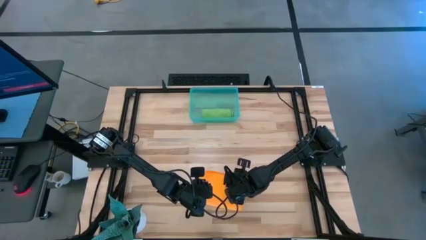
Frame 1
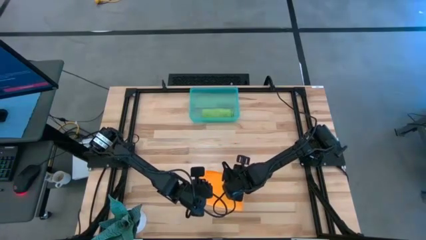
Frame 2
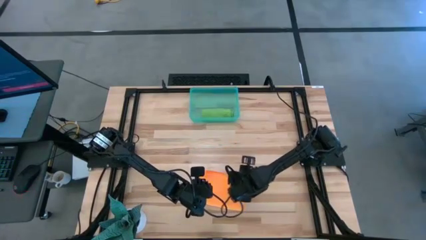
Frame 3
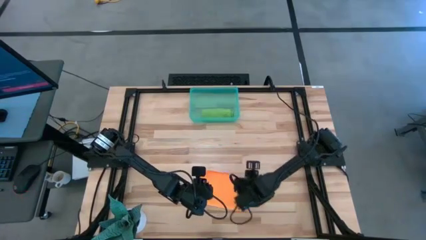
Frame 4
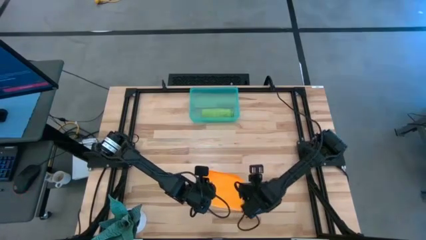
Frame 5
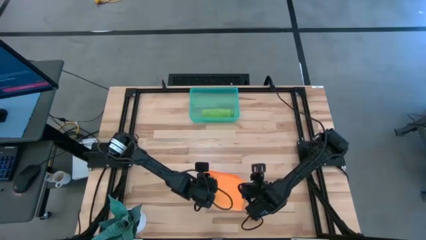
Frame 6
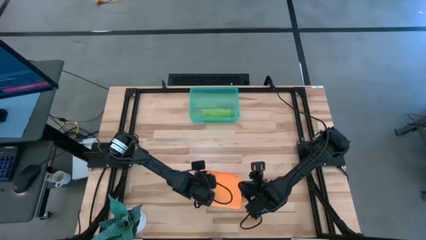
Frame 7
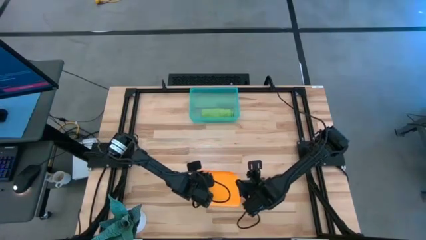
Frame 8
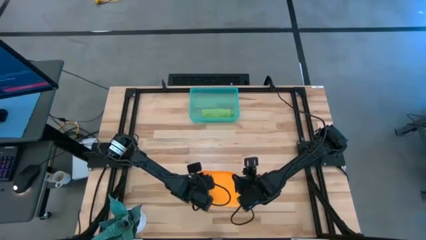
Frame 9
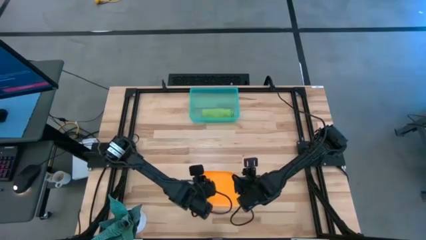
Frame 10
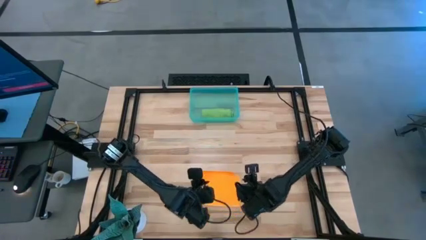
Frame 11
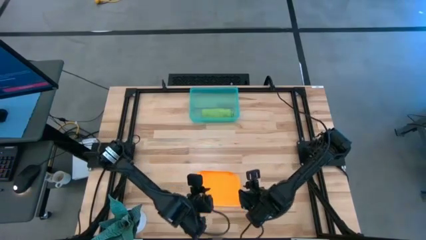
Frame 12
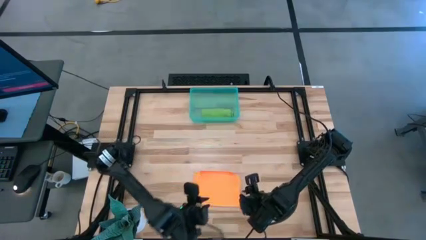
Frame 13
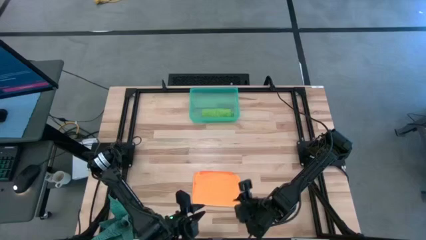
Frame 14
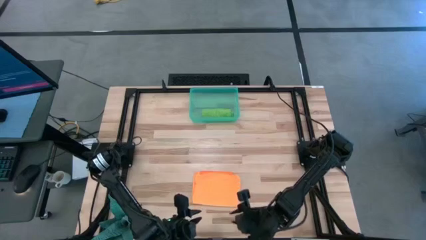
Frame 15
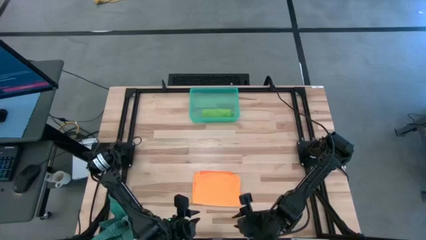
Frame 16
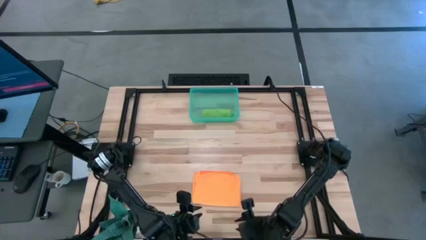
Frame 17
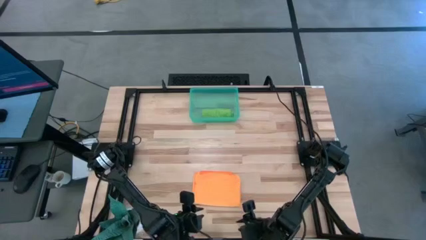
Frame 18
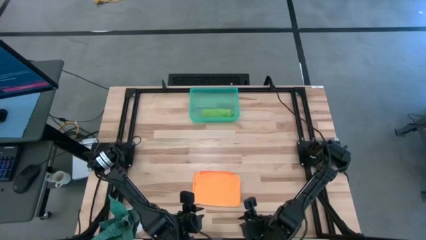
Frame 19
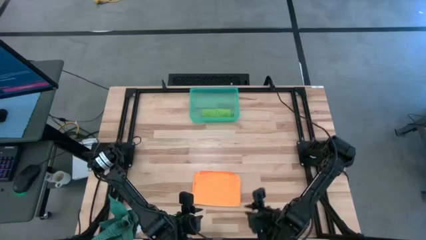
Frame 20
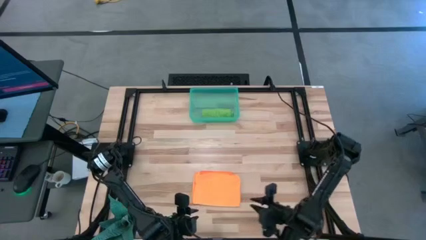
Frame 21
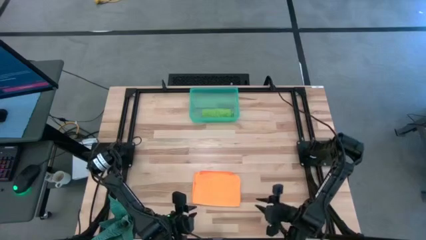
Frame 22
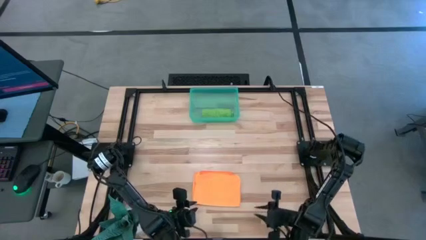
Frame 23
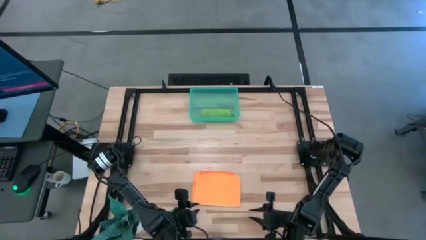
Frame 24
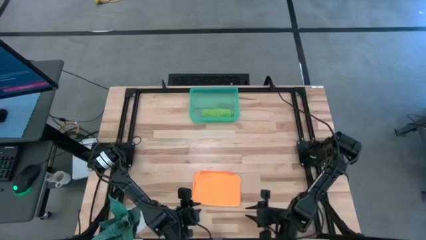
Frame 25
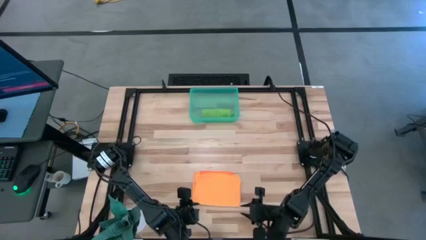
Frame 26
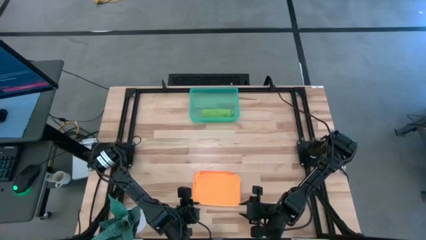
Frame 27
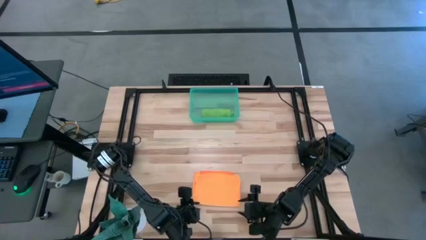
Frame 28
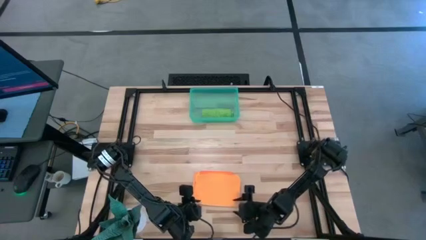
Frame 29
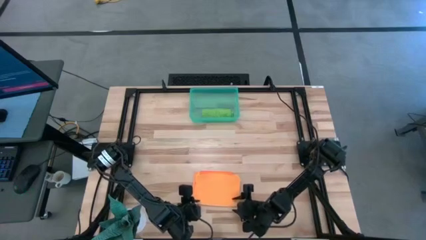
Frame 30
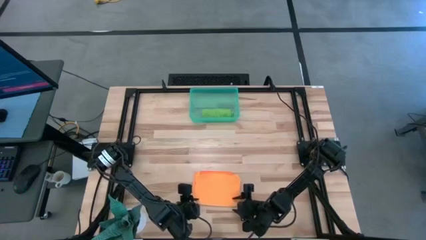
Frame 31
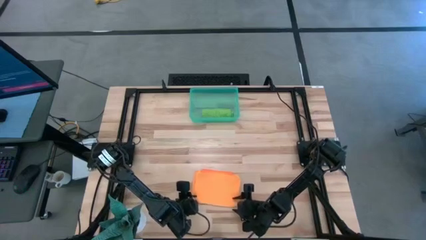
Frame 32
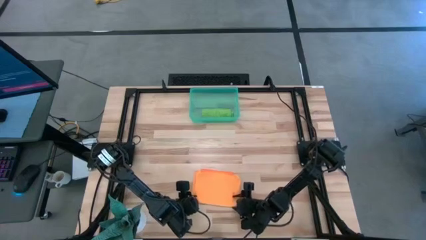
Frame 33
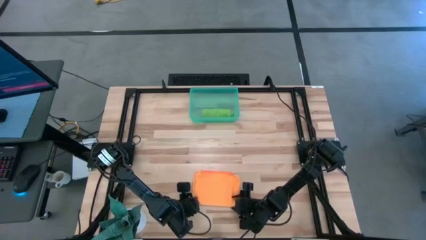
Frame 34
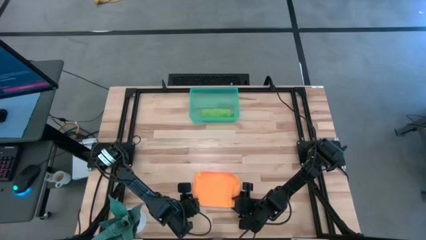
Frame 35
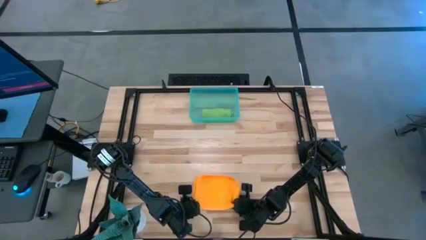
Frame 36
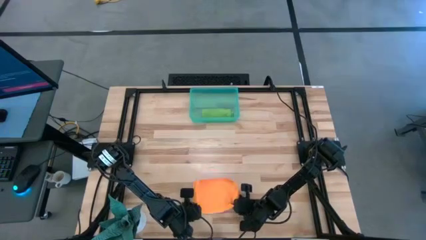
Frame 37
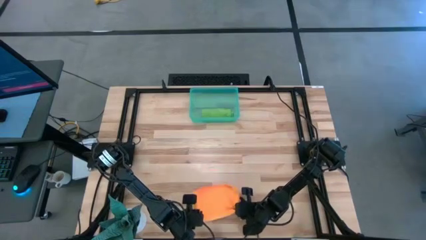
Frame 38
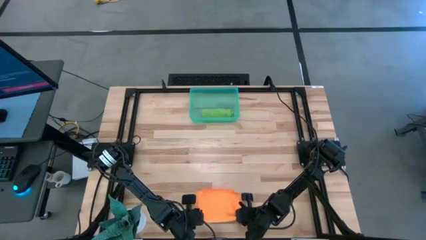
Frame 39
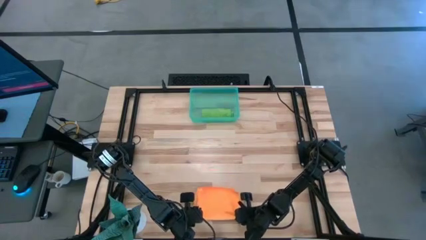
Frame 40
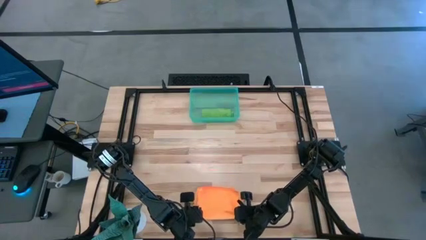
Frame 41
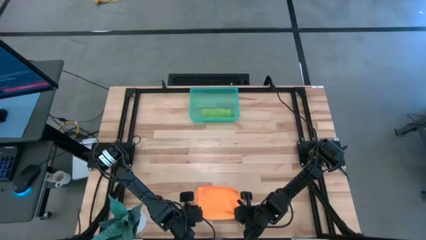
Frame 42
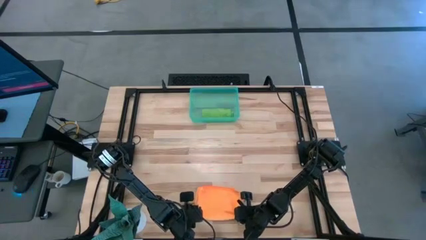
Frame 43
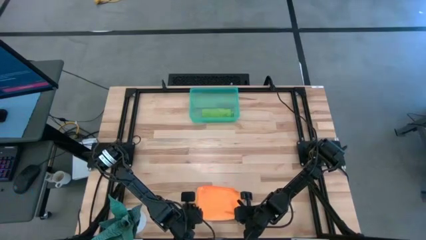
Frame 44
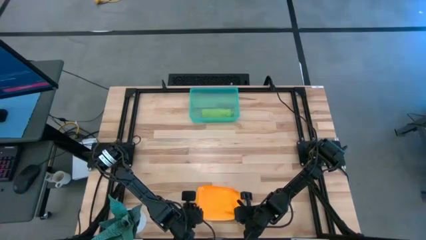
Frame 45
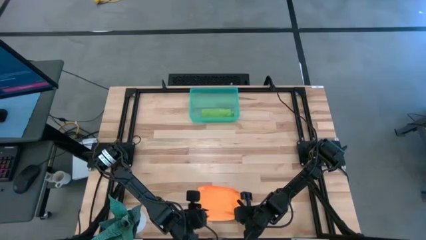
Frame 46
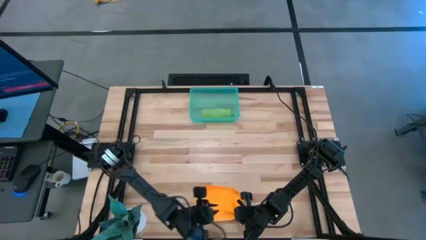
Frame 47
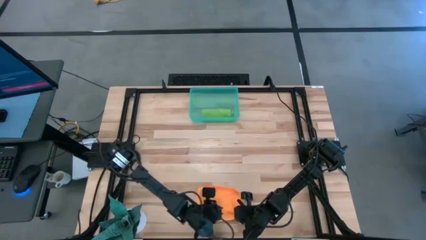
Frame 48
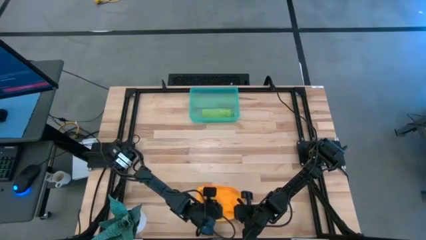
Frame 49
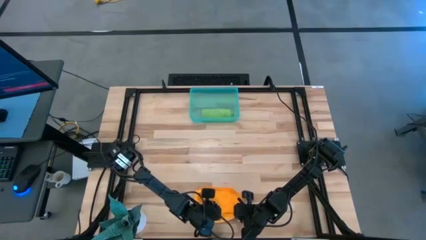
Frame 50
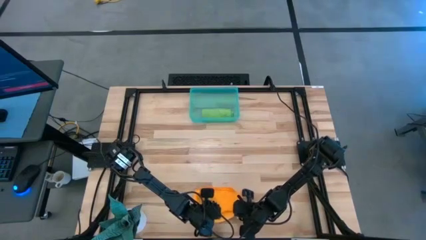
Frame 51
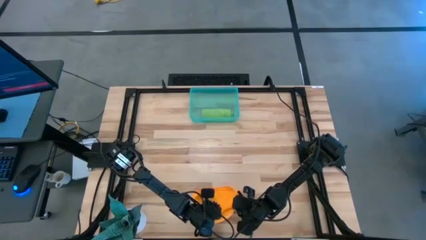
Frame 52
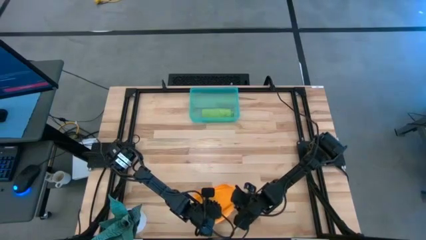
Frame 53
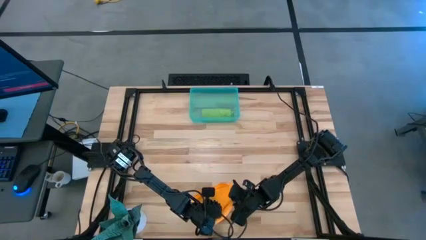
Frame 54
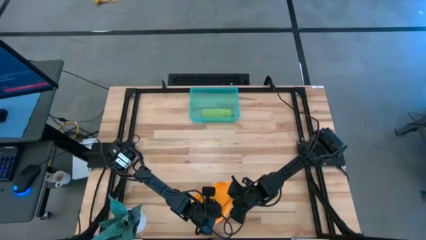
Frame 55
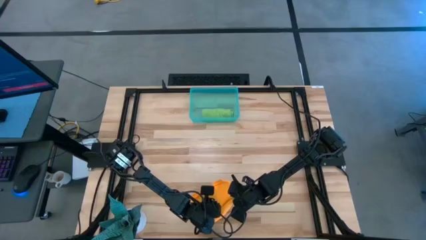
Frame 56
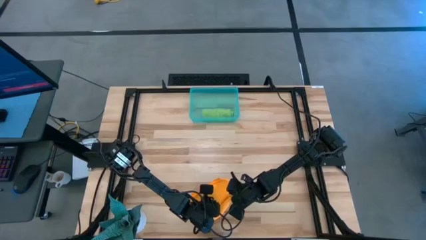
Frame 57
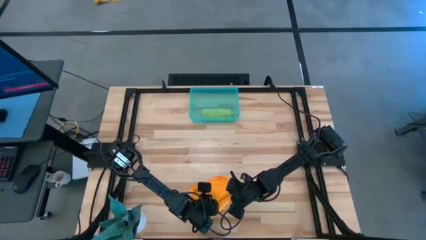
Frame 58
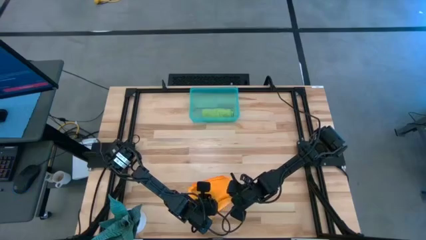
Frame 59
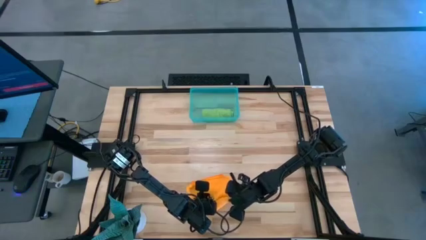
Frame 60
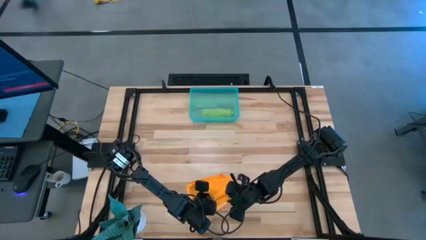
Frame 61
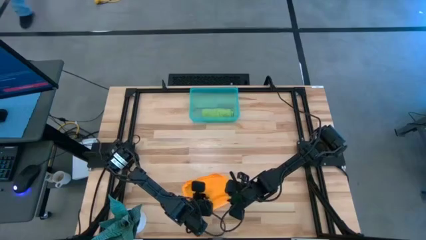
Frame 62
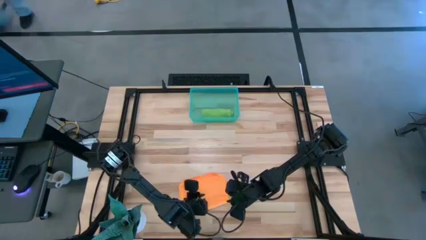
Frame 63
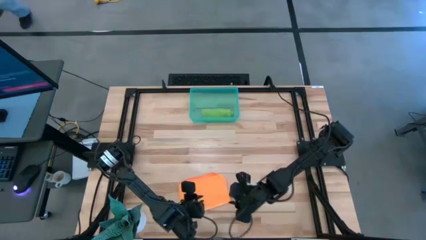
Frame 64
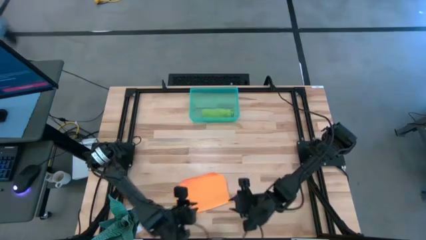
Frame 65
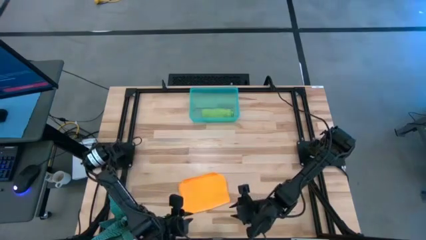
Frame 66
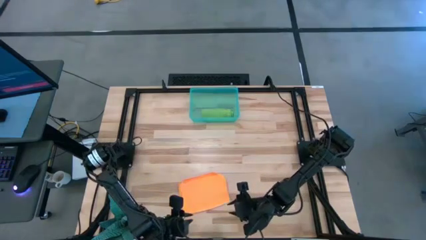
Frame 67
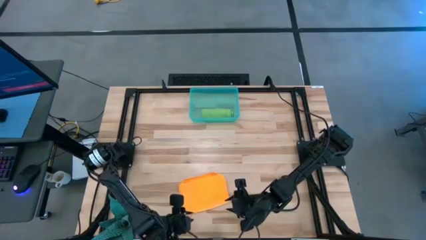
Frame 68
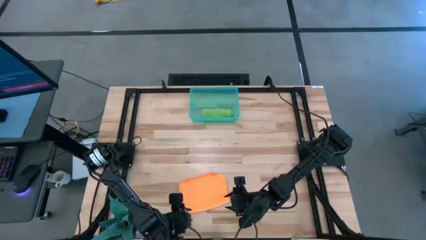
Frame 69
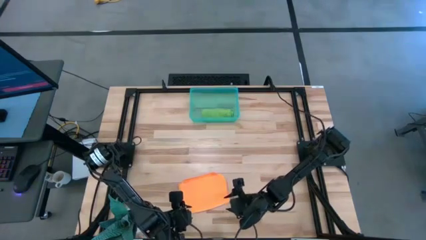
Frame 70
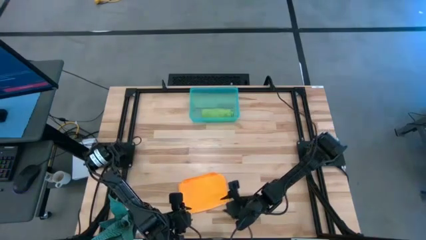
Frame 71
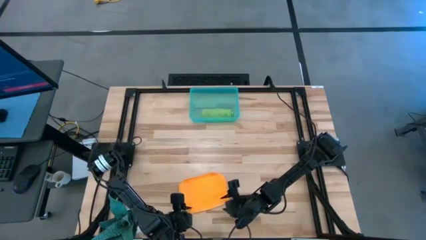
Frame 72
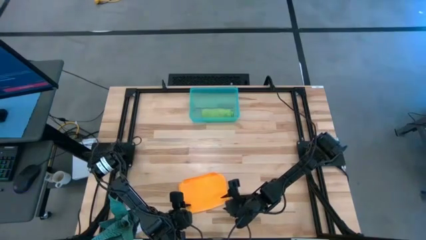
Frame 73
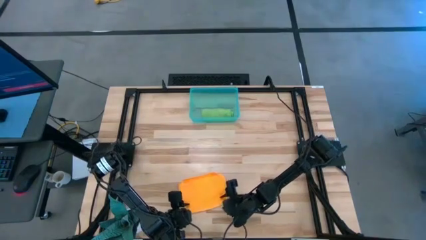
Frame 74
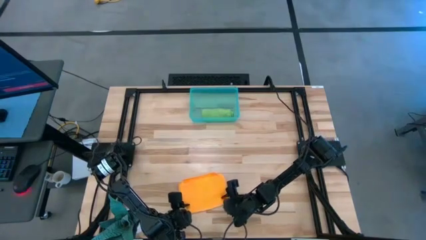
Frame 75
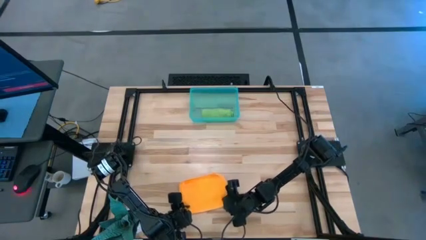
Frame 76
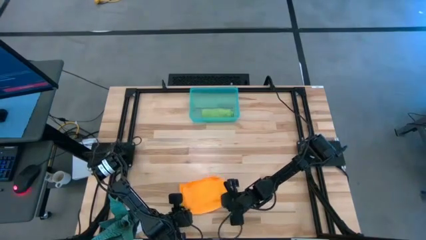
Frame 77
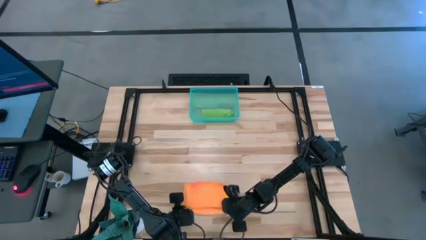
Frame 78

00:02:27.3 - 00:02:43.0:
Task: Roll microfiber towels into tight, uniform cylinder then place into a basket
Fold the orange towel
